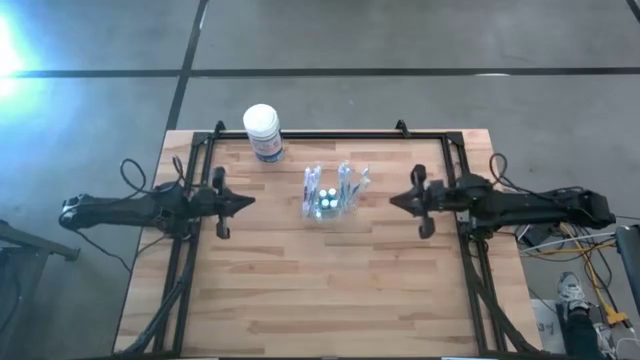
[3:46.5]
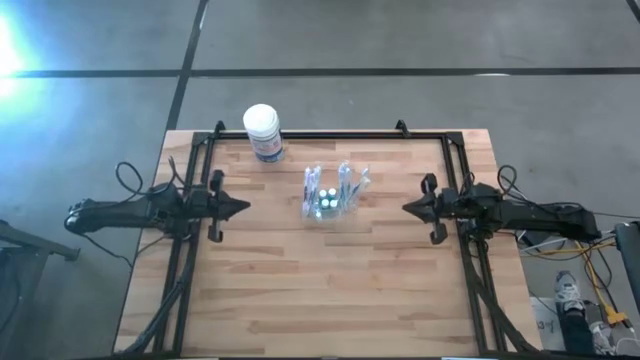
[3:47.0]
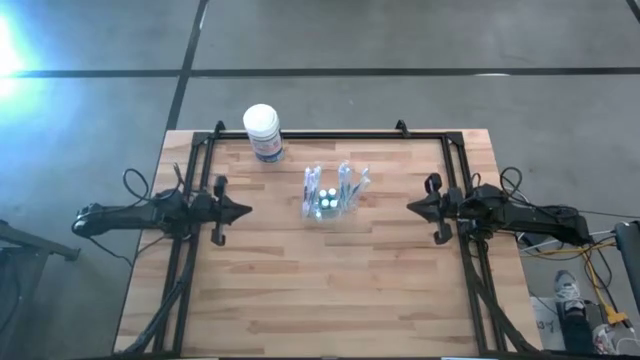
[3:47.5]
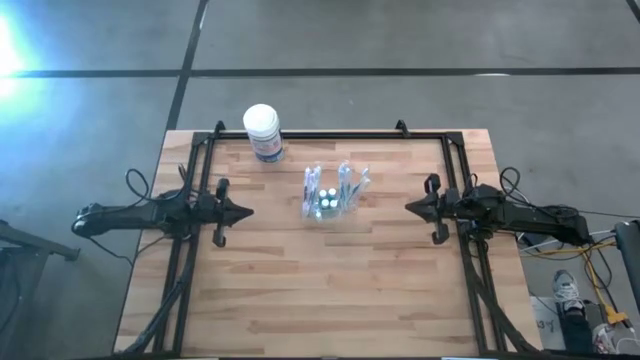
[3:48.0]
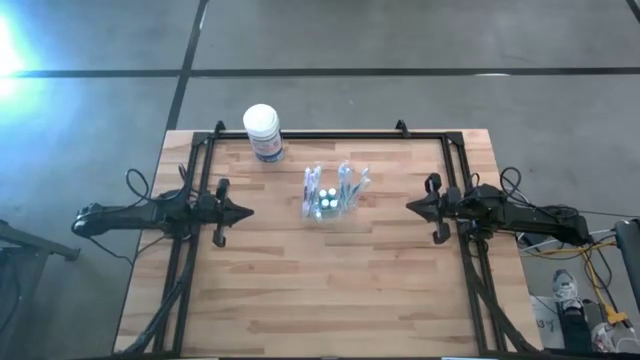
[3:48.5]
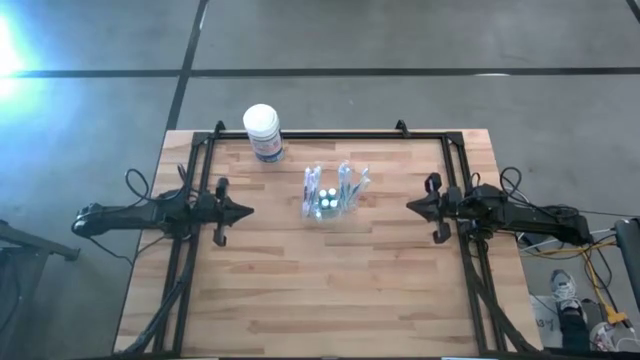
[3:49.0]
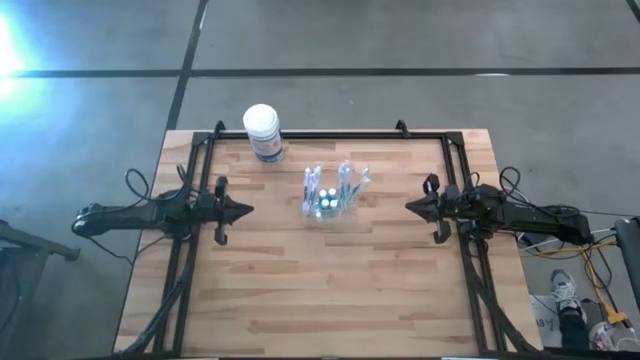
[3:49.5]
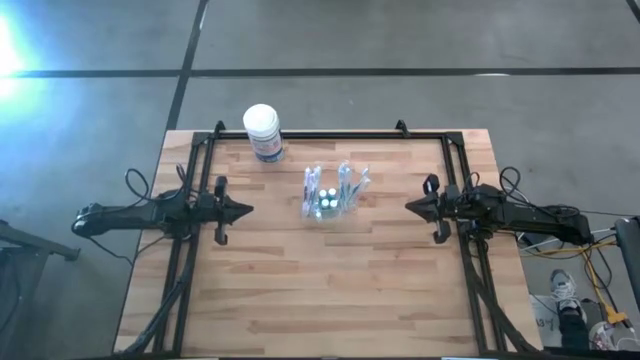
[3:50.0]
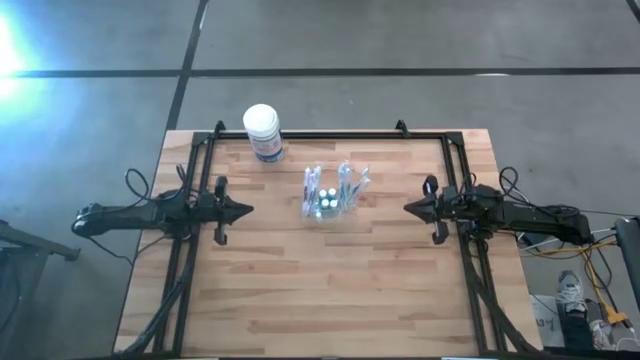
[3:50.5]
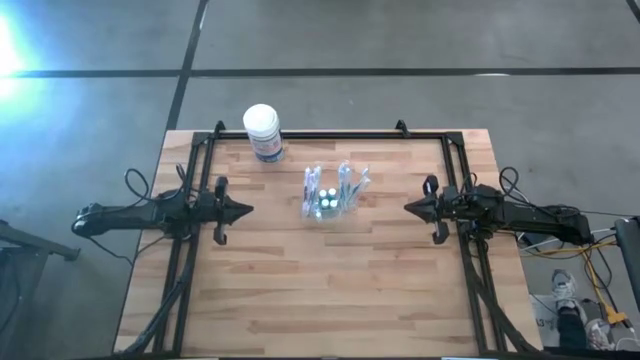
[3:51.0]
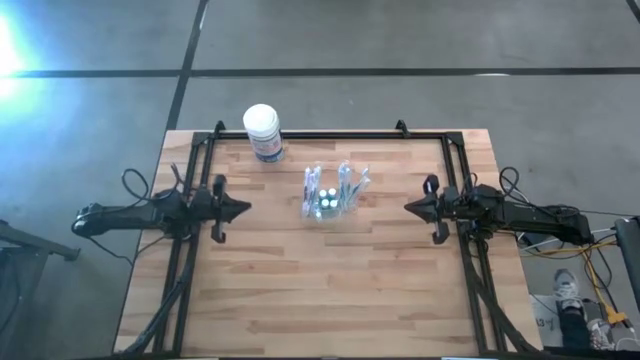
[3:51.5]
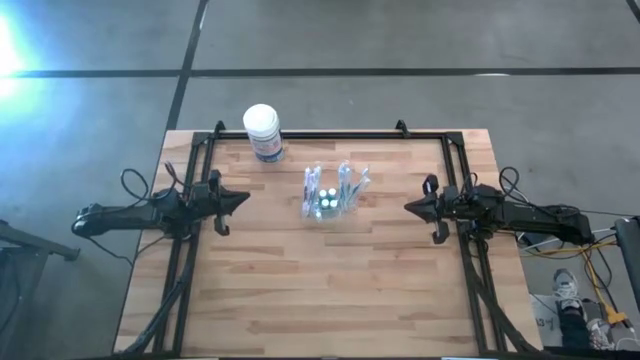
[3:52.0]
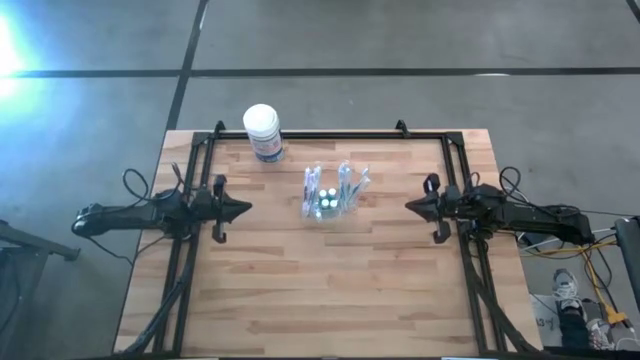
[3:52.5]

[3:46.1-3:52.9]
Task: Pick & Place toothbrushing station
Return to home position

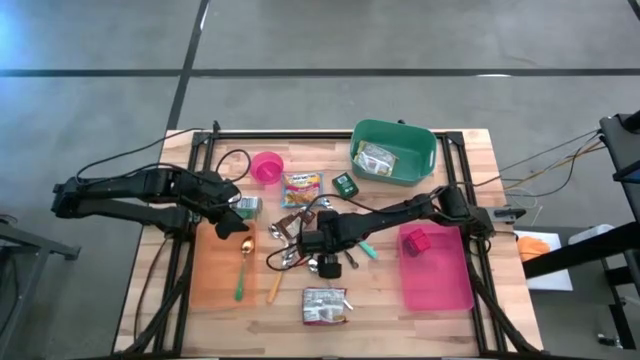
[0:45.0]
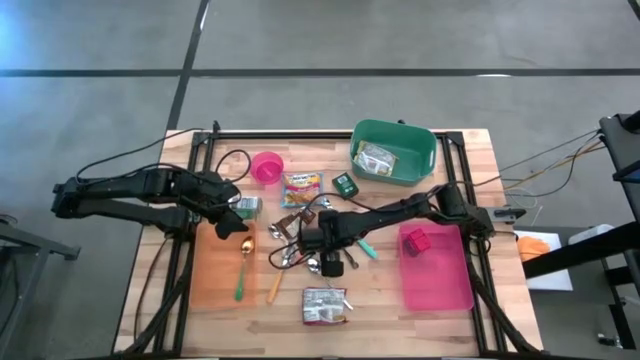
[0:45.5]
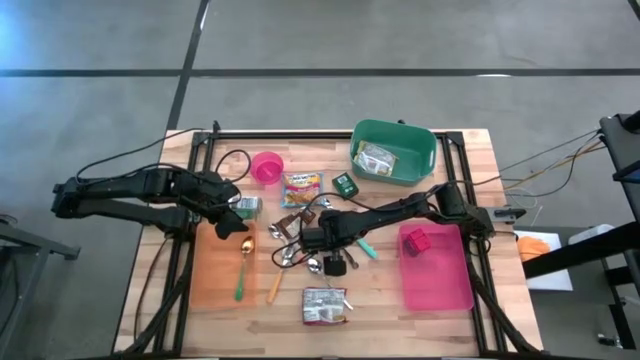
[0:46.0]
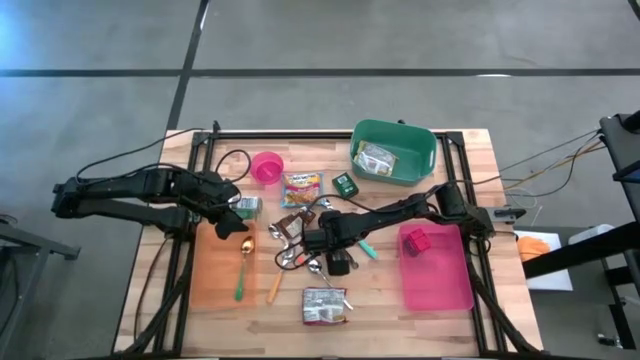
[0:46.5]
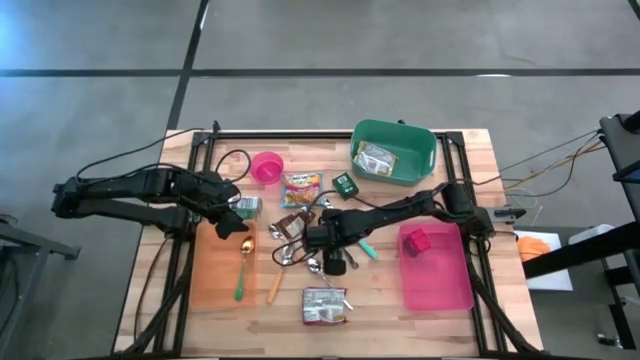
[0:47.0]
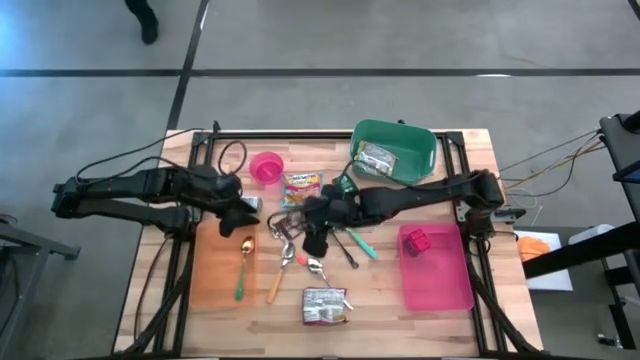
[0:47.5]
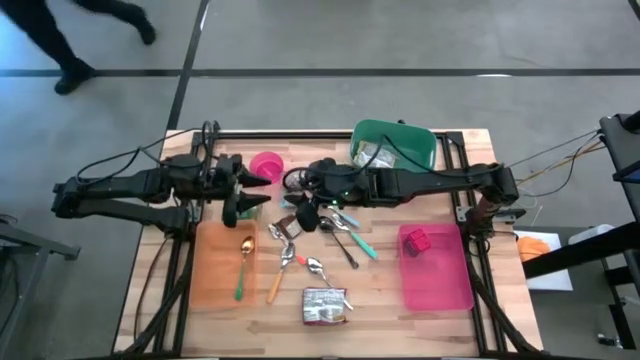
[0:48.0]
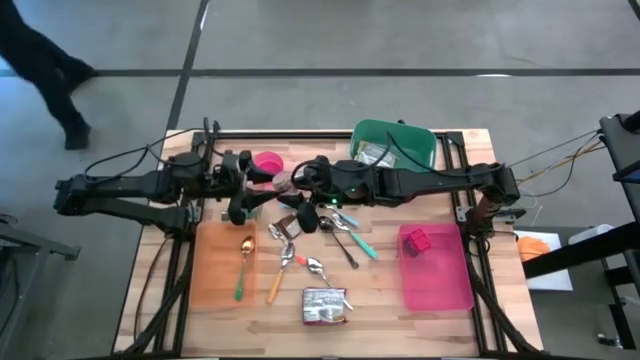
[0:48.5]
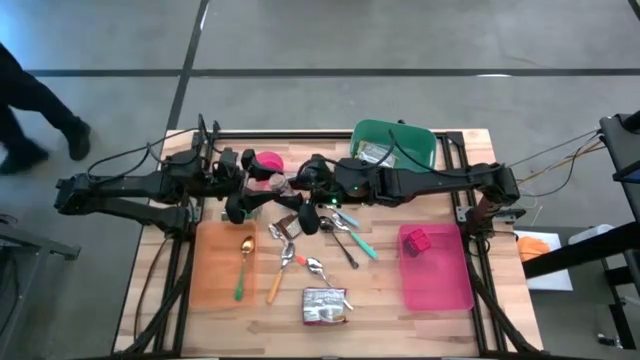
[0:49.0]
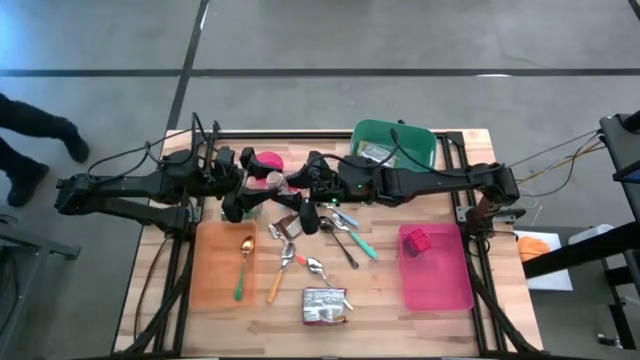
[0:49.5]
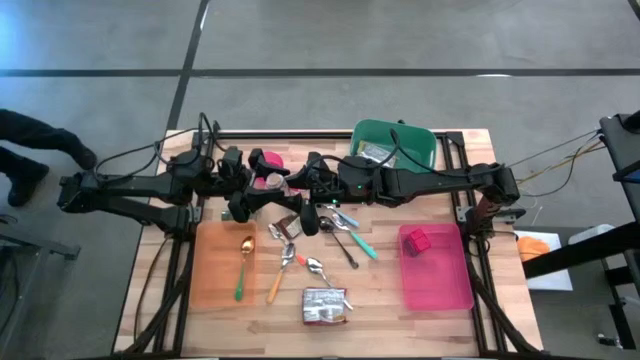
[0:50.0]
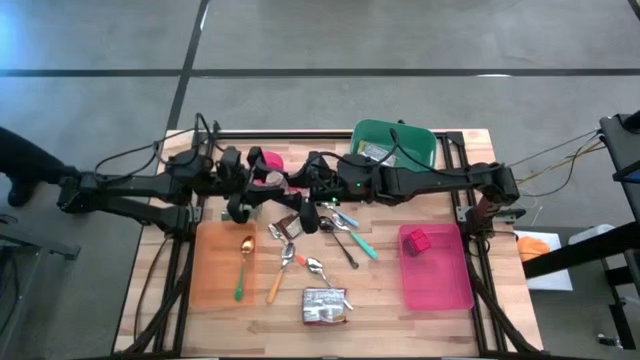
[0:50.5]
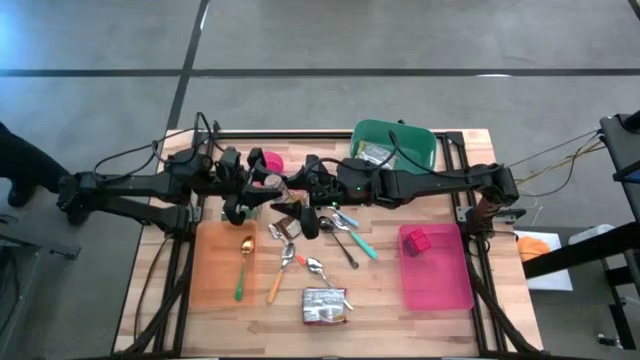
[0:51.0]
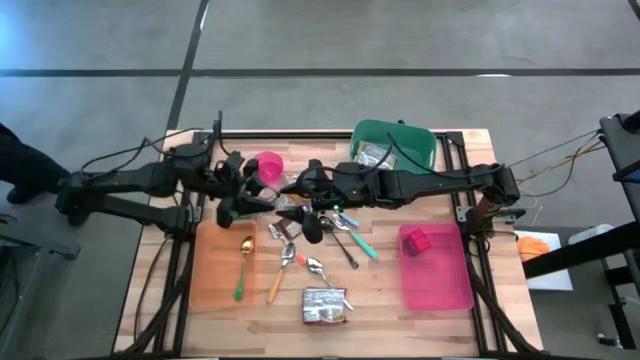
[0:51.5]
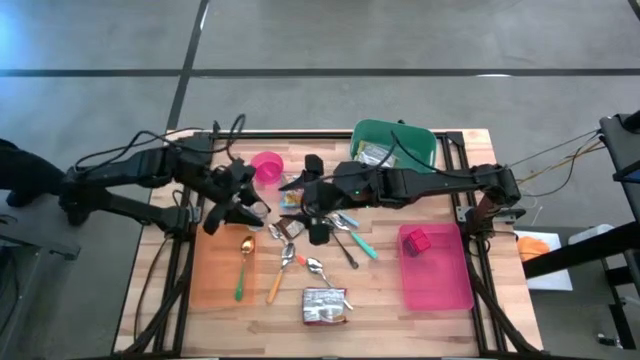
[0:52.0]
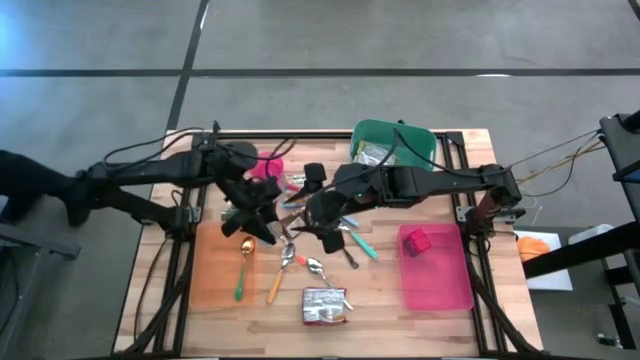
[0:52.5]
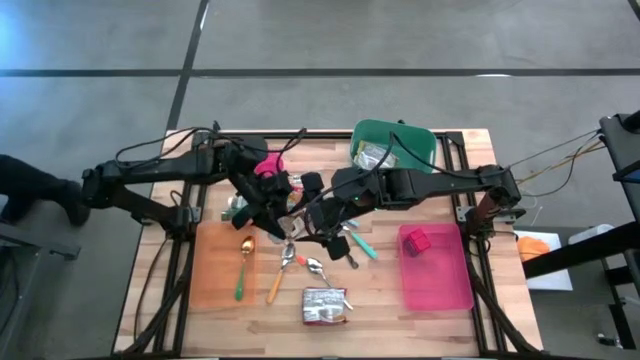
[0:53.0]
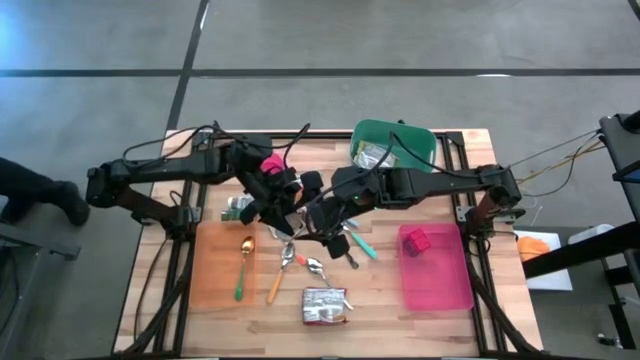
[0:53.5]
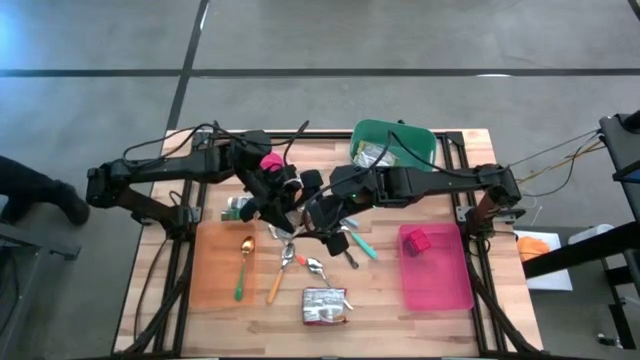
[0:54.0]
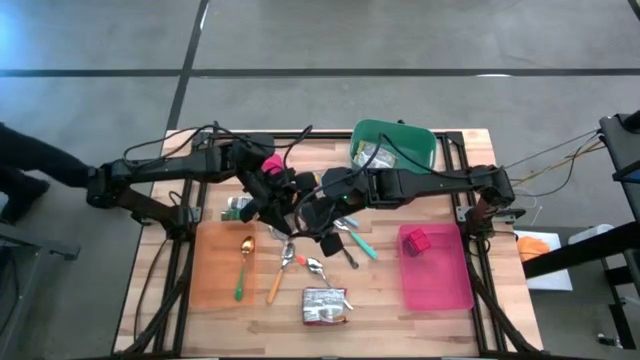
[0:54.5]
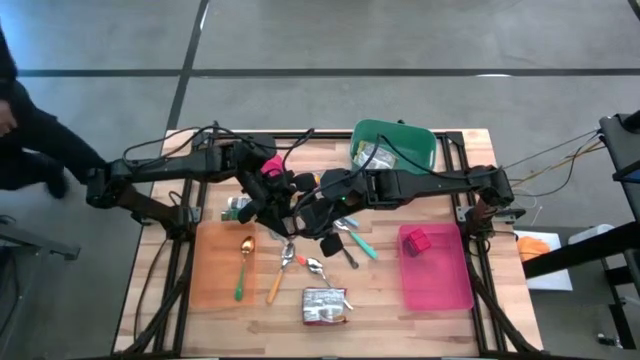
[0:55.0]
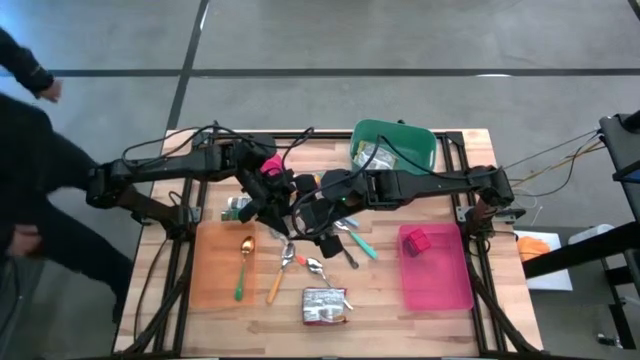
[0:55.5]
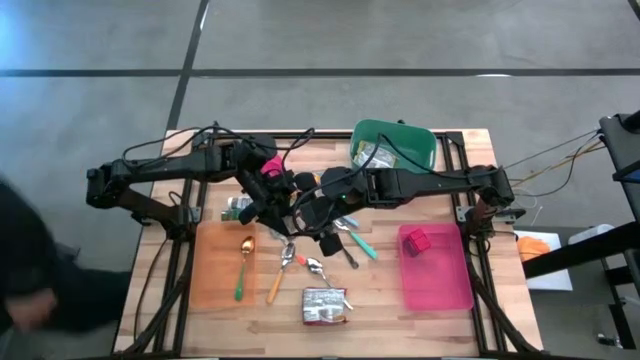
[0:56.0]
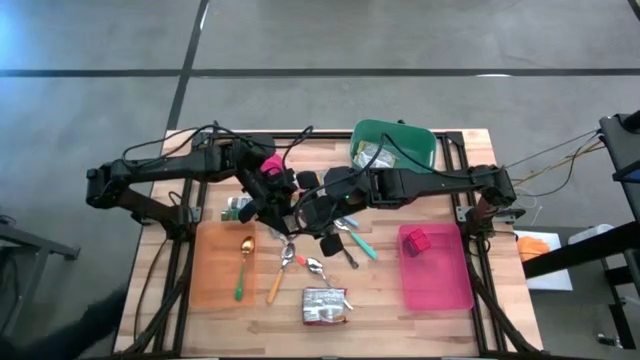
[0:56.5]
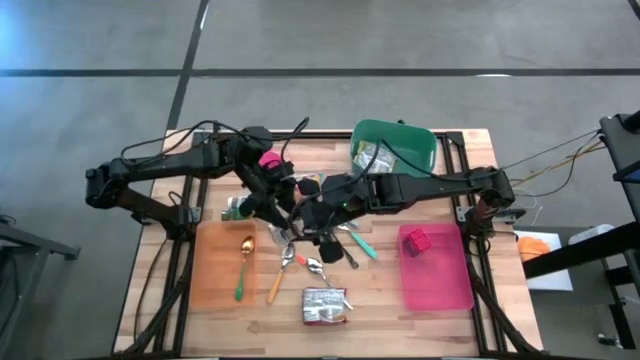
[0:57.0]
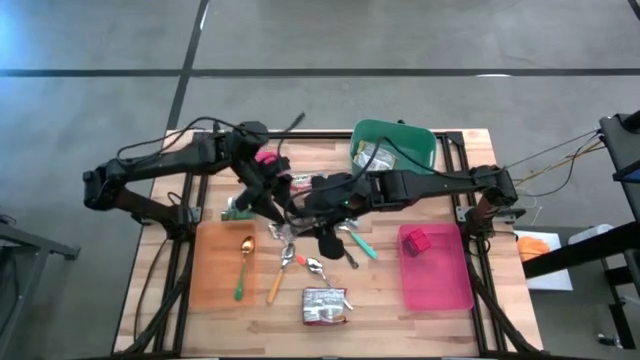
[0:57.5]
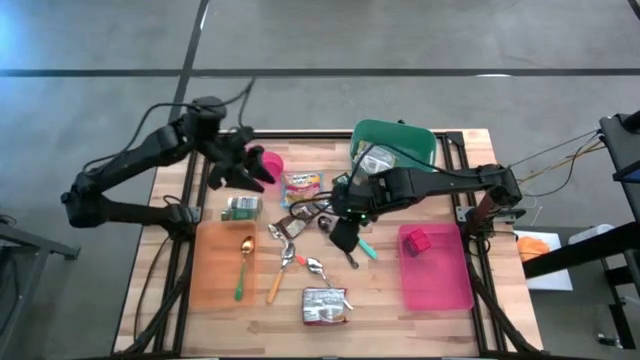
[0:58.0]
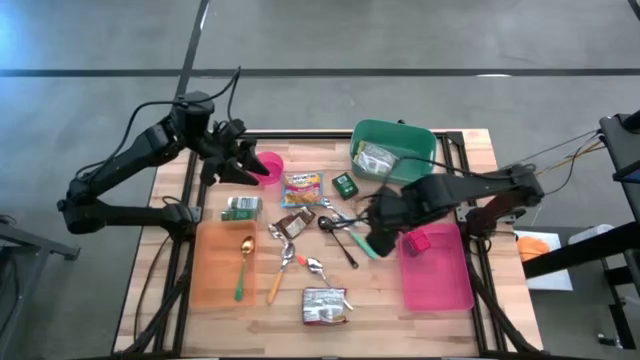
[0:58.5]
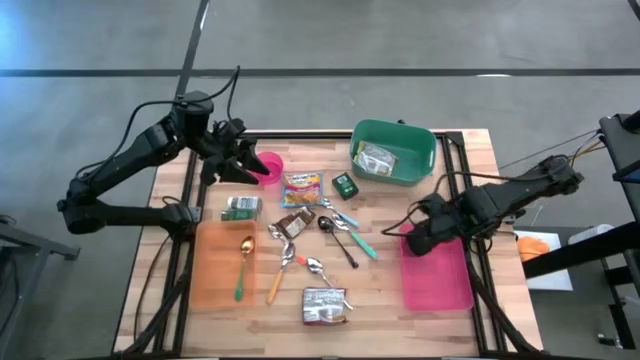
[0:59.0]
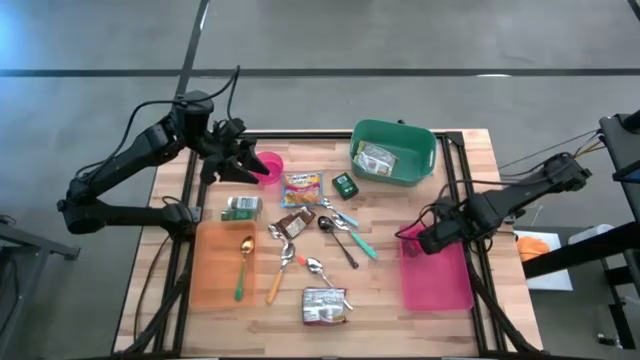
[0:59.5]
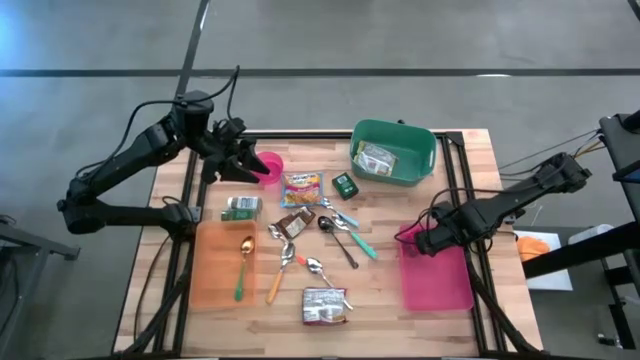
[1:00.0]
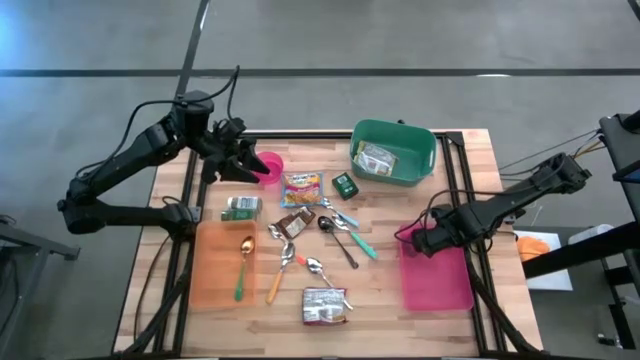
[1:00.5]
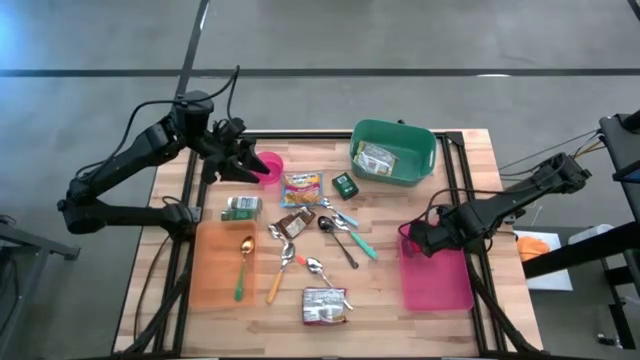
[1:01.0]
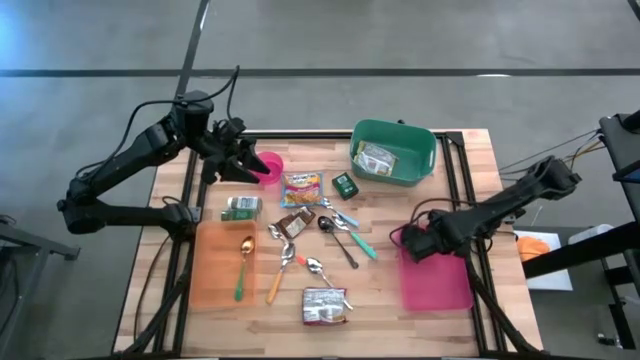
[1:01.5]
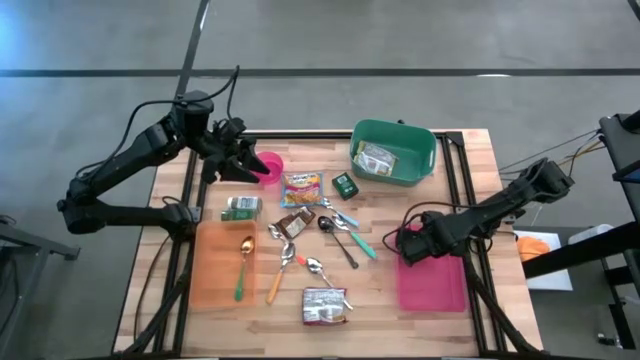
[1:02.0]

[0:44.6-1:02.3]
Task: Pick & Place Food Item
Put the brown seasoning bottle into the pink bin
